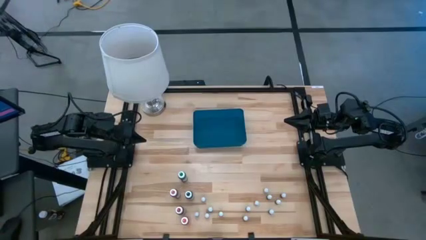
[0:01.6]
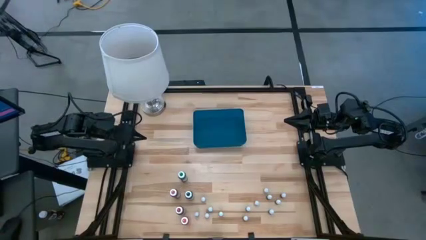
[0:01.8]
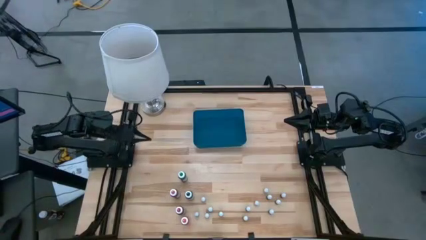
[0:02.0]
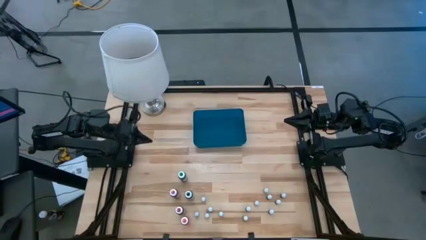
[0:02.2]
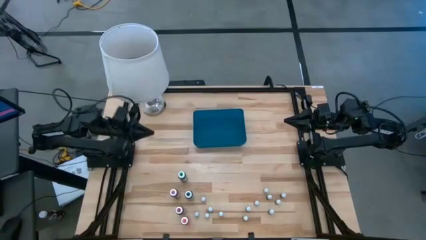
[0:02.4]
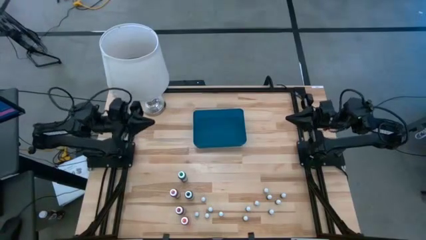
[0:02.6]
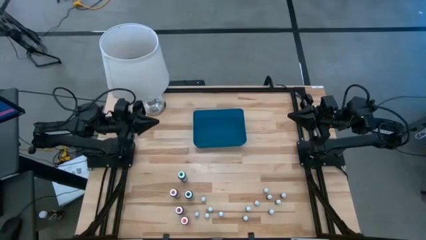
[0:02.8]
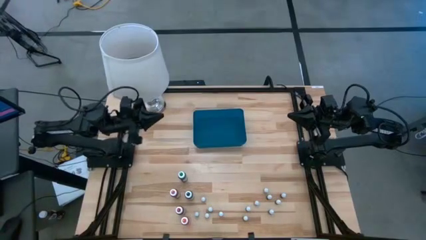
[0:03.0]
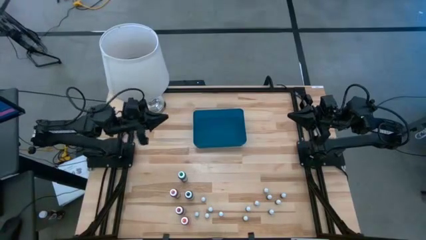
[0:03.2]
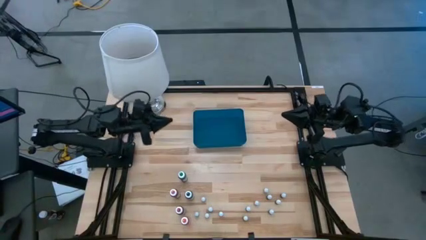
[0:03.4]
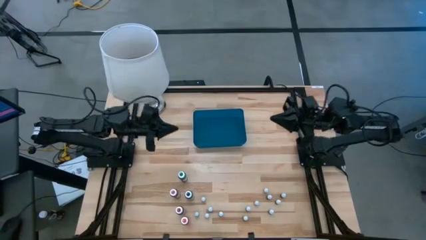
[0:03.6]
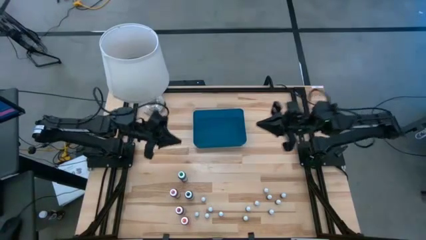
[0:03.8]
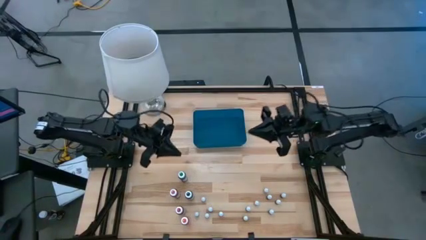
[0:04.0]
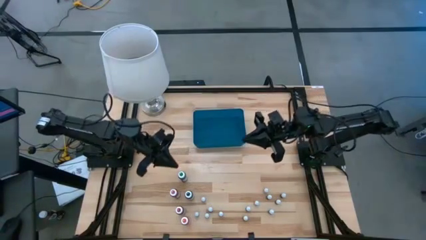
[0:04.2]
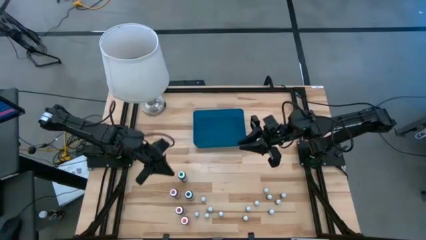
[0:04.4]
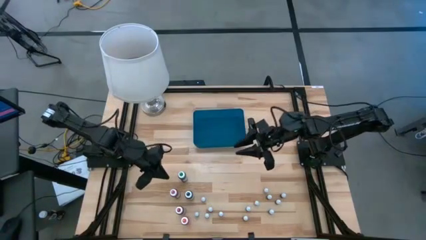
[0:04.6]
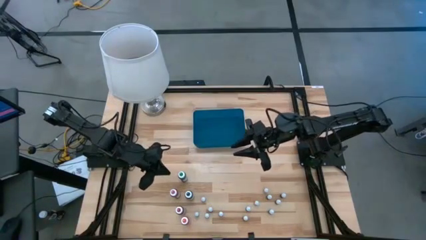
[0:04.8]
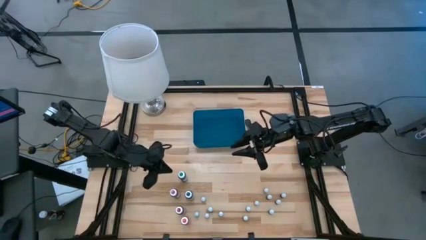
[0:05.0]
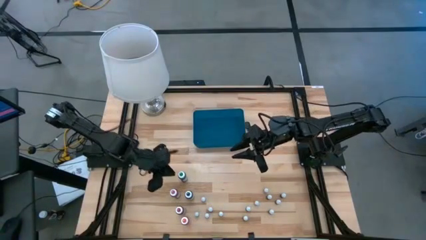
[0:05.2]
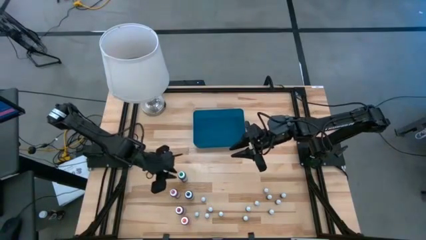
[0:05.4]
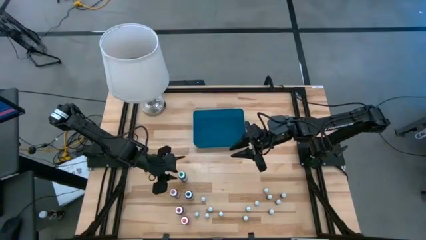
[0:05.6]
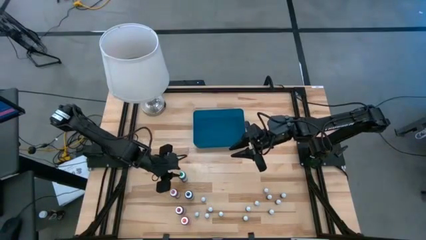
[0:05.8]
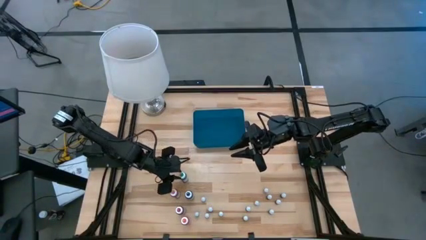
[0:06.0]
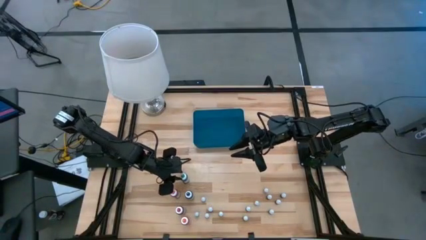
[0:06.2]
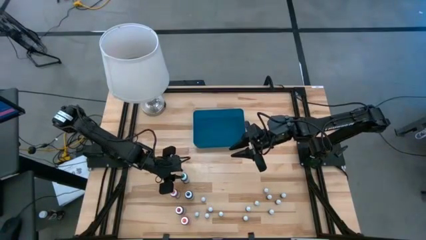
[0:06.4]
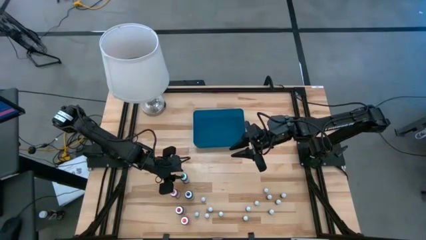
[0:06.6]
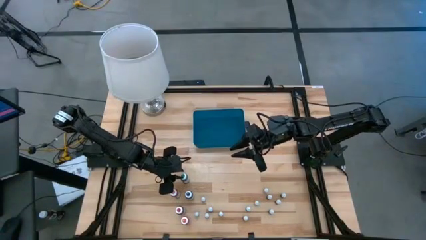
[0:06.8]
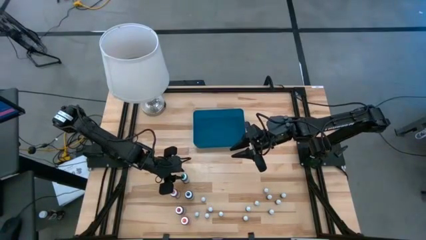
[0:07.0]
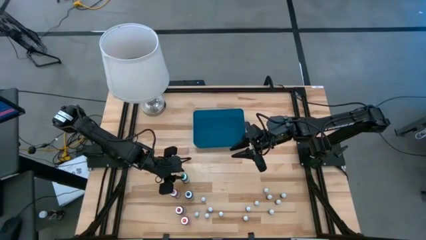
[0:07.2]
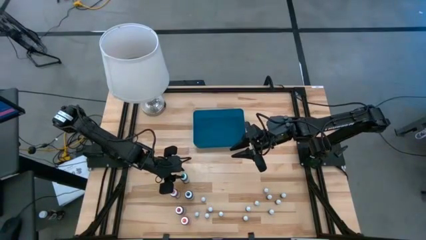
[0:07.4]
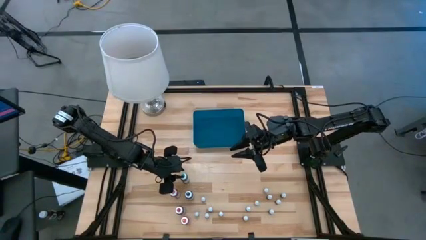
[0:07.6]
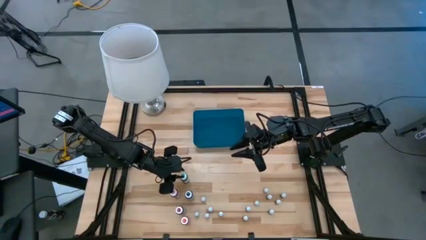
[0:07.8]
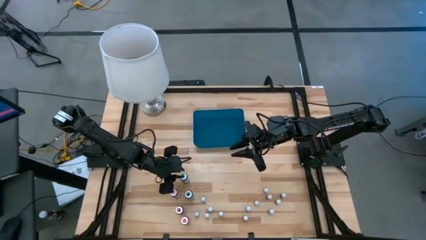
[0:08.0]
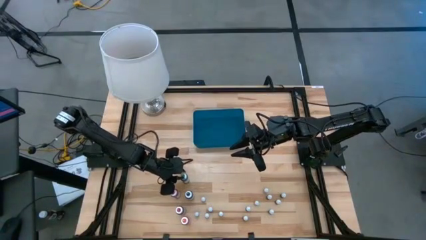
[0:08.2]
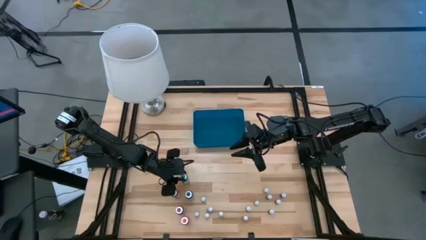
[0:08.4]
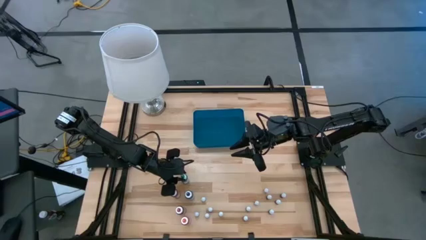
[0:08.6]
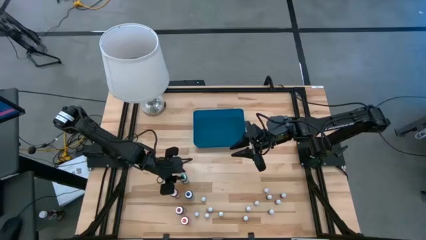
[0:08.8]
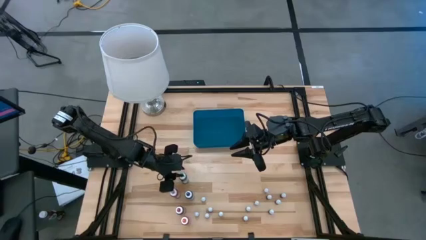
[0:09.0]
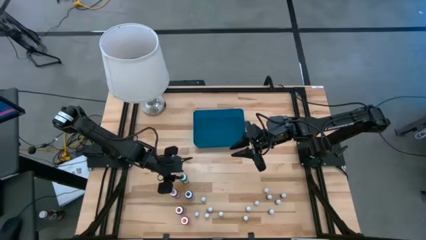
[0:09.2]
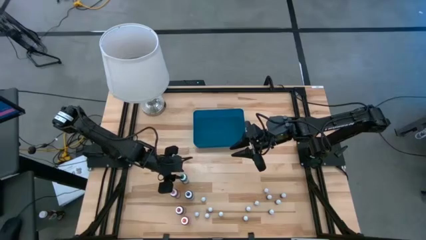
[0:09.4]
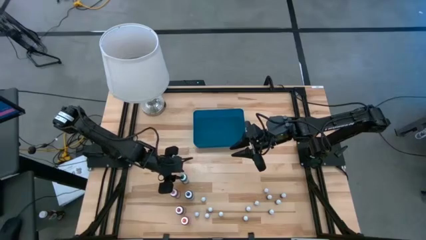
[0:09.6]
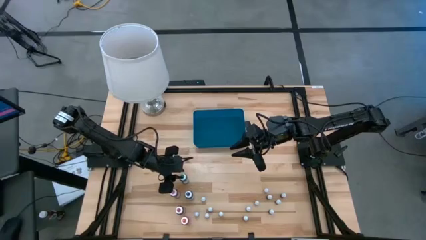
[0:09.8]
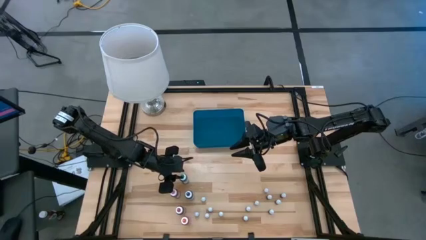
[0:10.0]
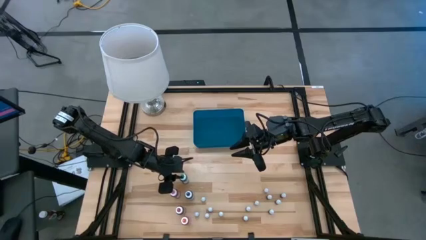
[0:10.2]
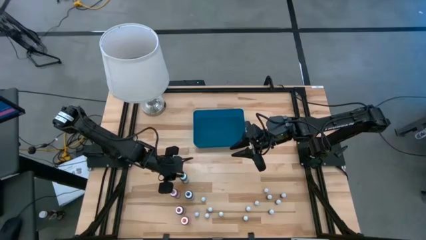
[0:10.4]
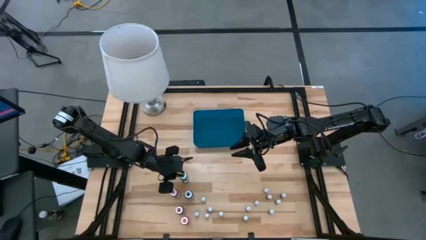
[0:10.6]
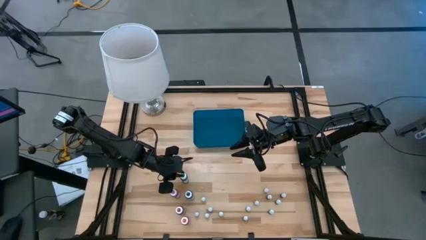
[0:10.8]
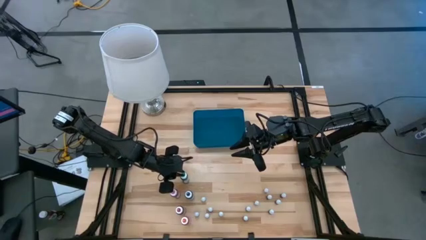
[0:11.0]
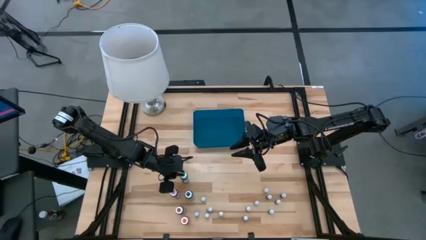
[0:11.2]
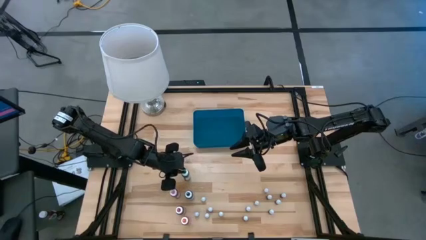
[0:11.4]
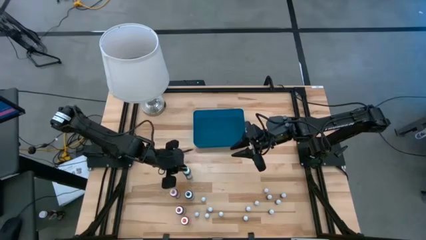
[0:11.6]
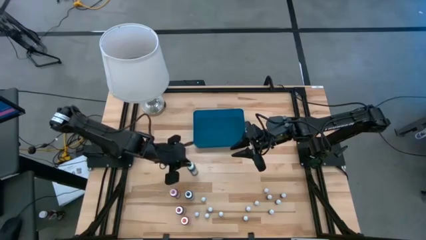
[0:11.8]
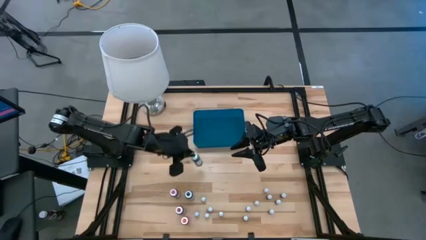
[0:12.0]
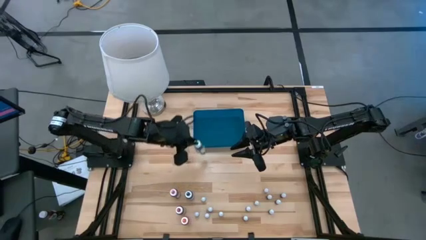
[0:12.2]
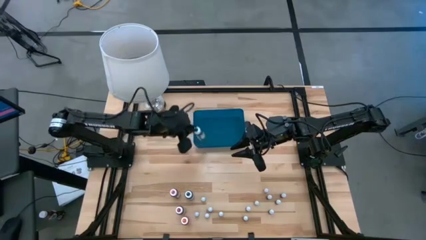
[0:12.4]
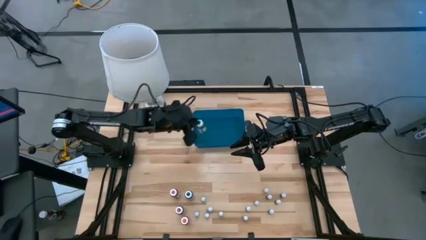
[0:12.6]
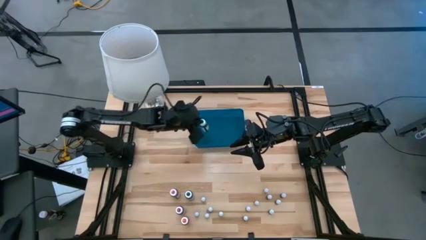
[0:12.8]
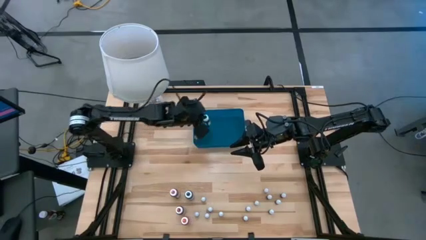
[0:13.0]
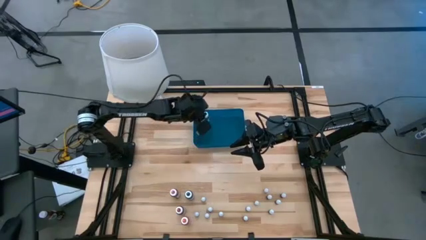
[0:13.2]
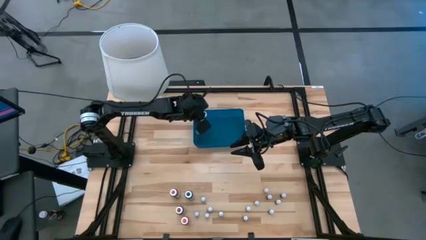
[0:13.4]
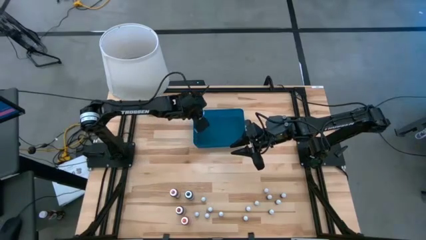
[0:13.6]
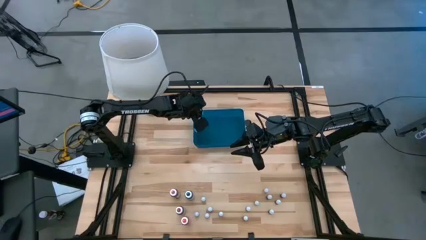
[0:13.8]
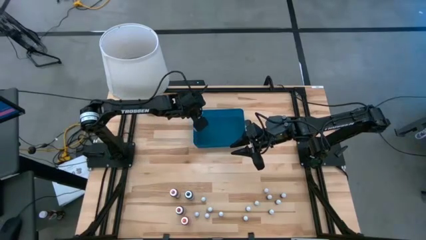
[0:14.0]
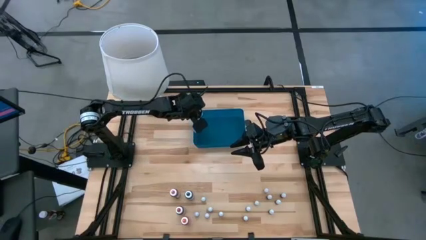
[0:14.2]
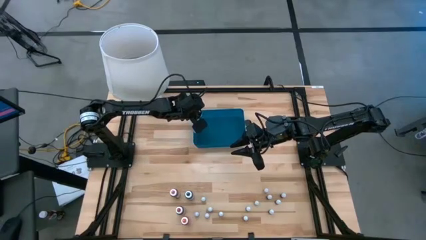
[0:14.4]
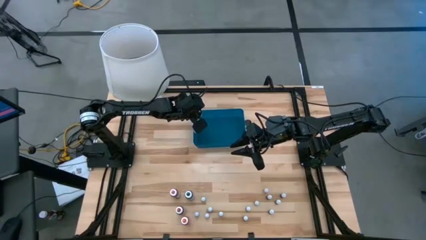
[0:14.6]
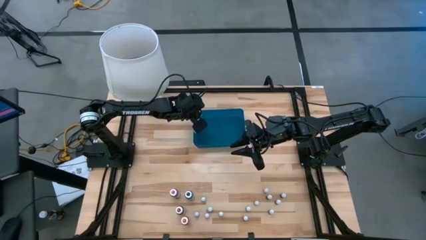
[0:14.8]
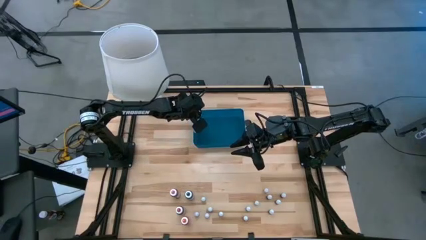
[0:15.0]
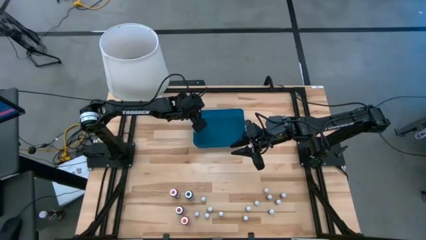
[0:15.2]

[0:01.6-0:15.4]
Task: Pick & Place food coloring
Put the large green food coloring bottle into the bin
